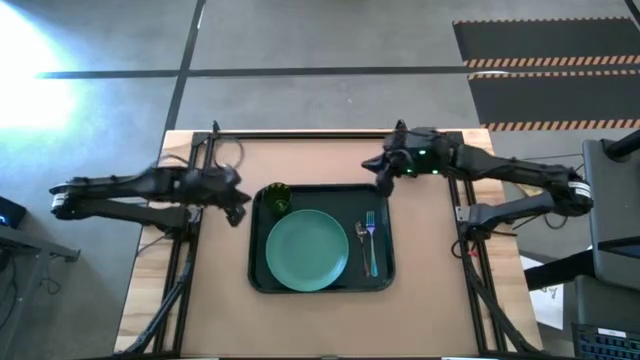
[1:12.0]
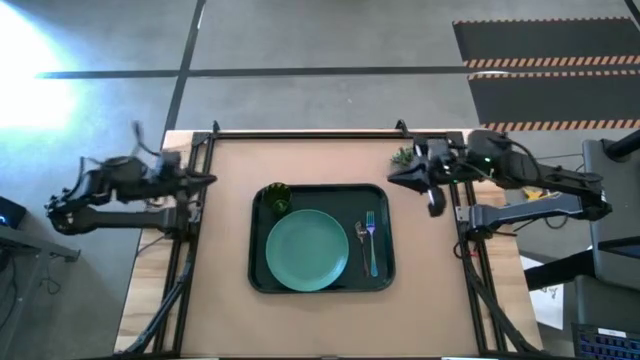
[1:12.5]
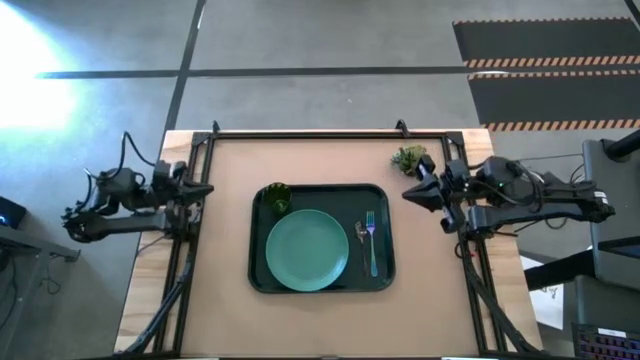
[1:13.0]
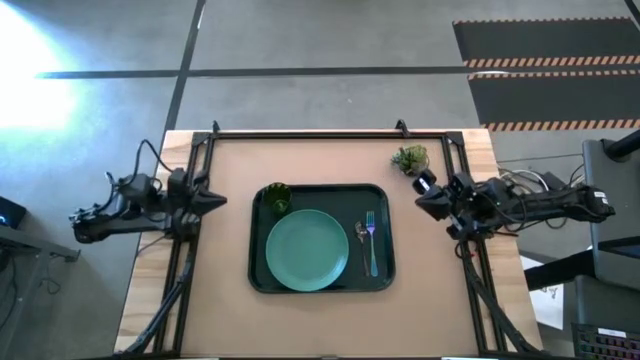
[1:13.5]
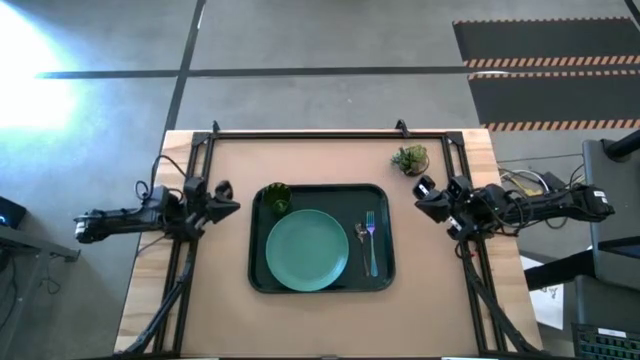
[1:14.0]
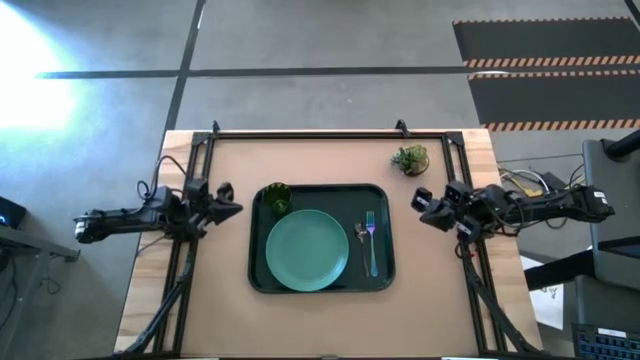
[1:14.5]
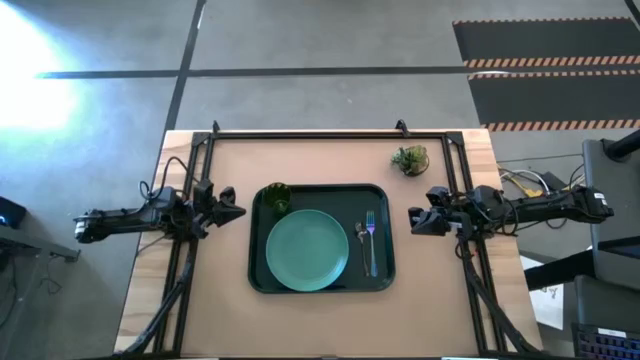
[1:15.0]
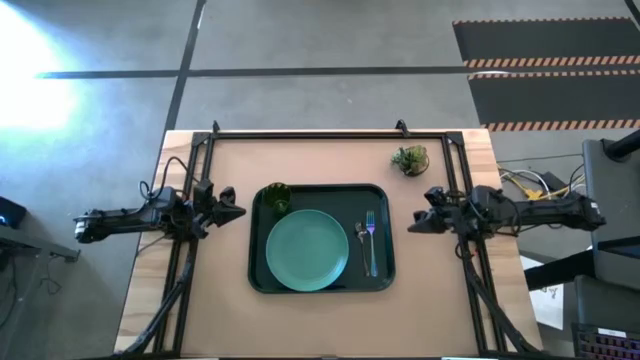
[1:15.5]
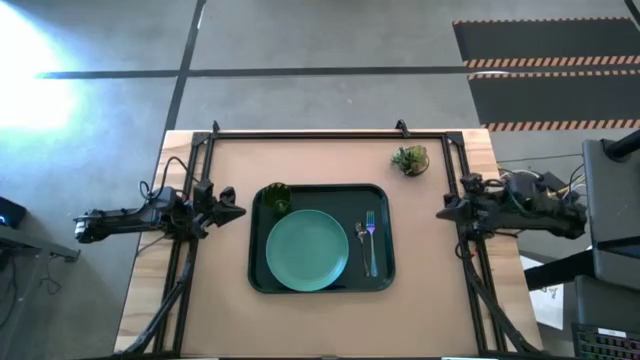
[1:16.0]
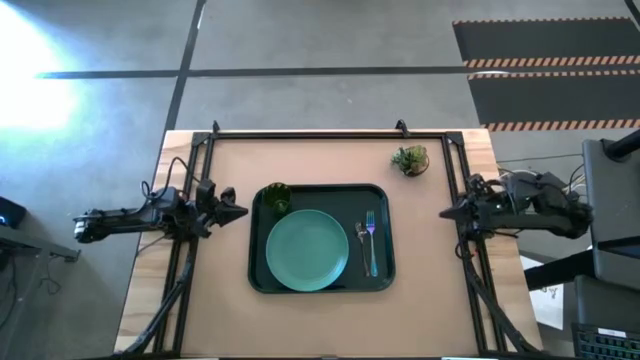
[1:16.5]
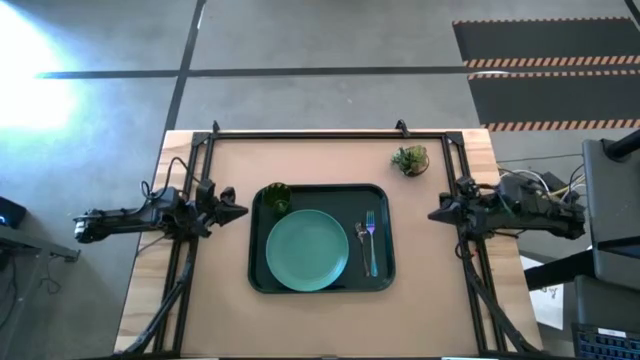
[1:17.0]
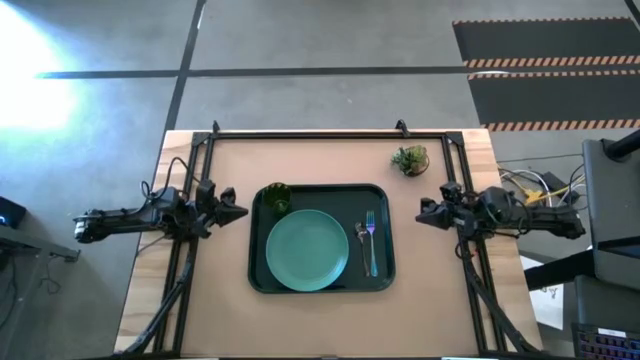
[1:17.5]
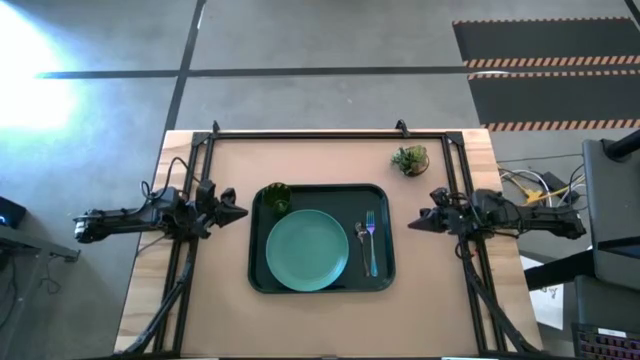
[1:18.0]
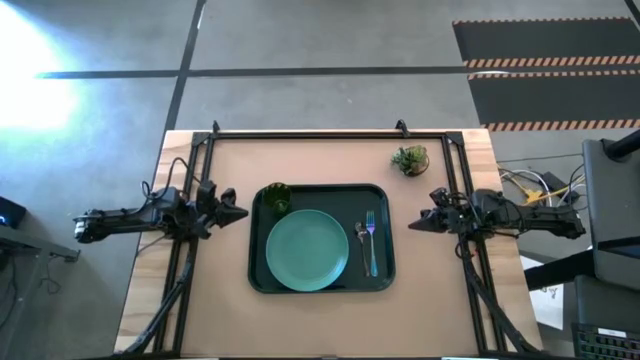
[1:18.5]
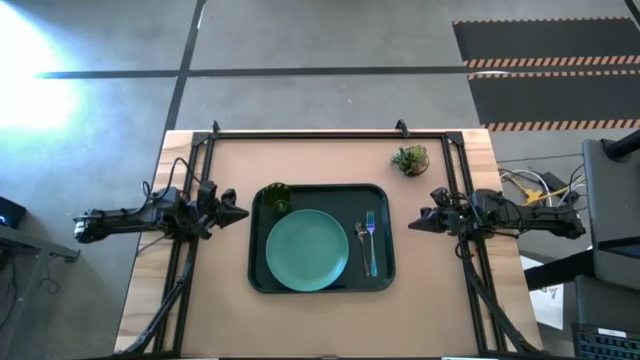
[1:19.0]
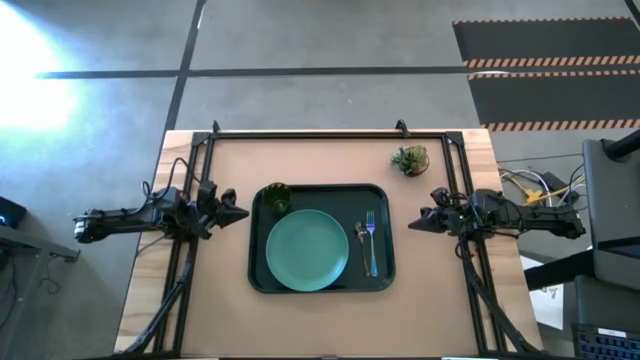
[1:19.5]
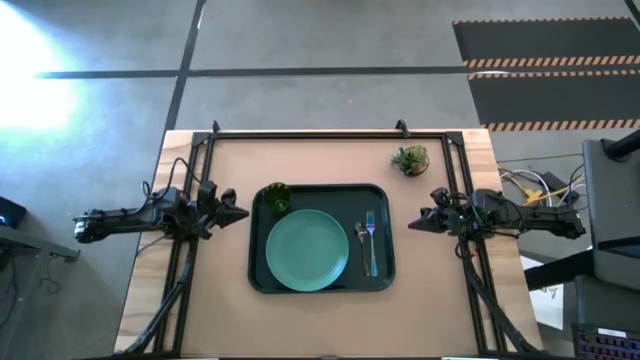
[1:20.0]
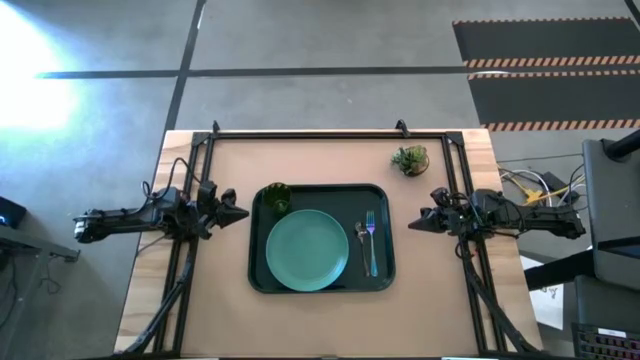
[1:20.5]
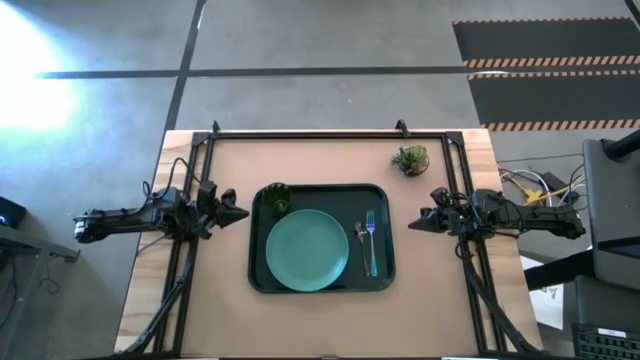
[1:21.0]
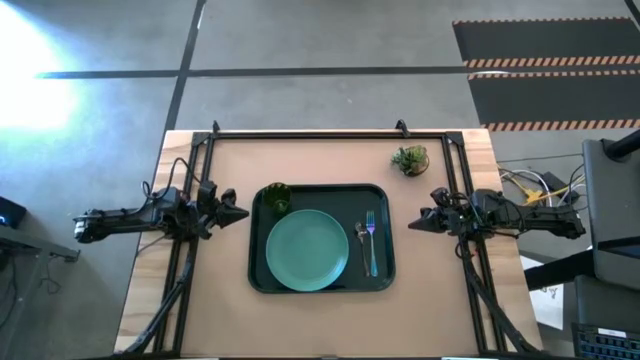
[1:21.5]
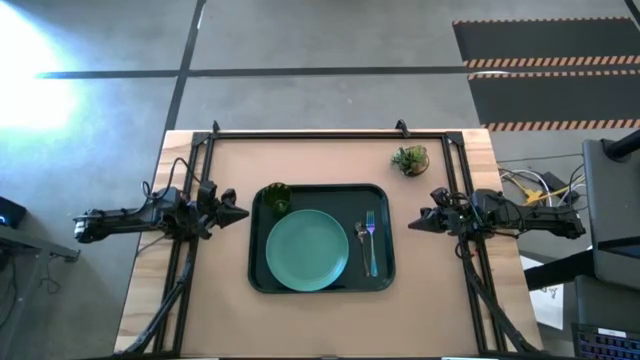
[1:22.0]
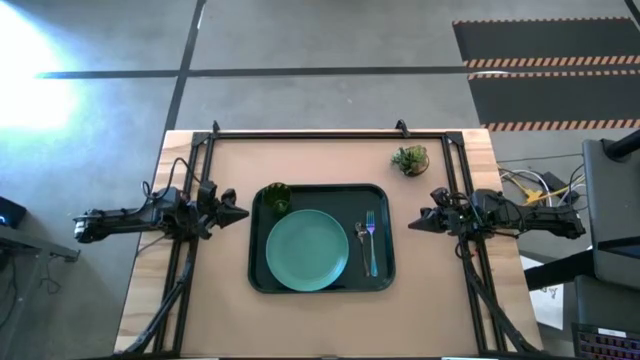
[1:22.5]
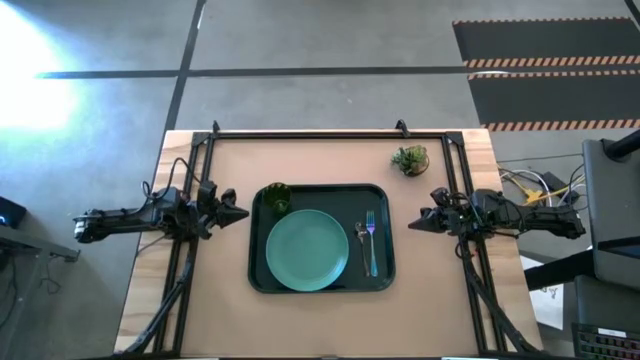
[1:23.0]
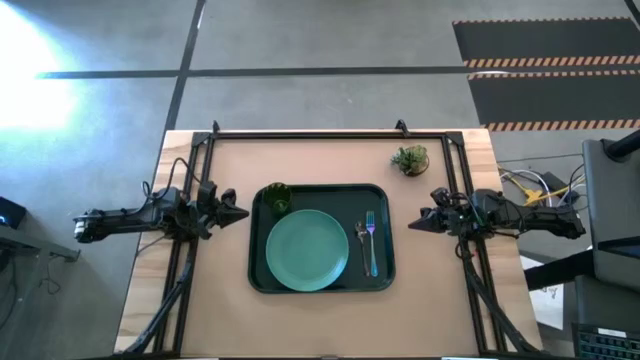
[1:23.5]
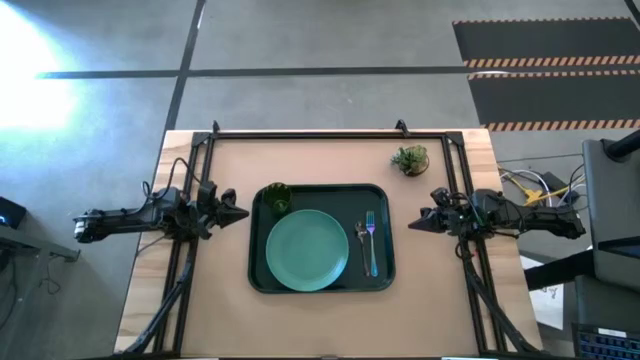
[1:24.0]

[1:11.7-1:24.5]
Task: Pick and place plate/cup/fork/spoon on tray
Return to Home Position

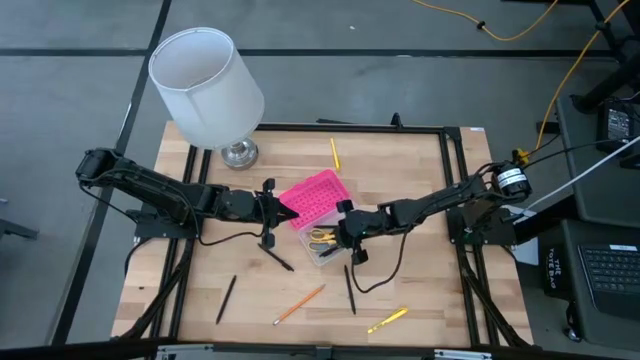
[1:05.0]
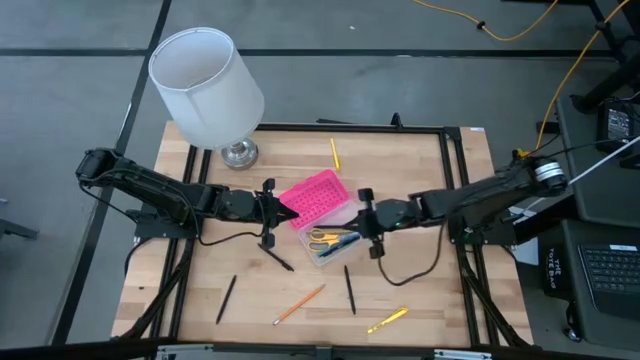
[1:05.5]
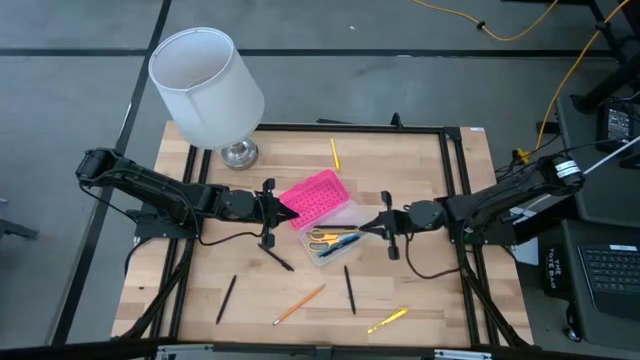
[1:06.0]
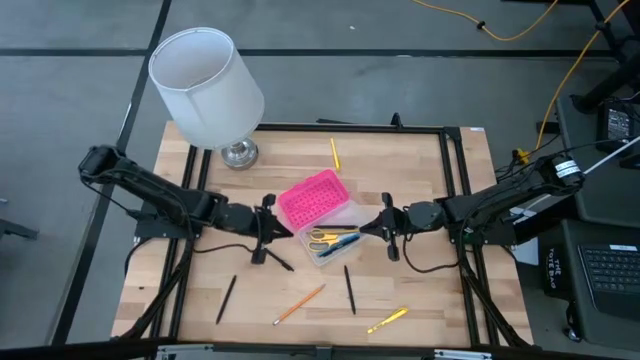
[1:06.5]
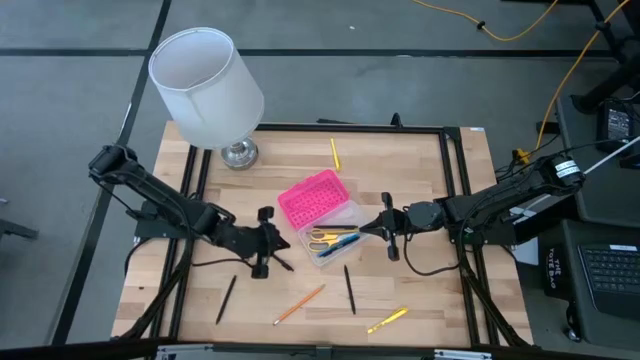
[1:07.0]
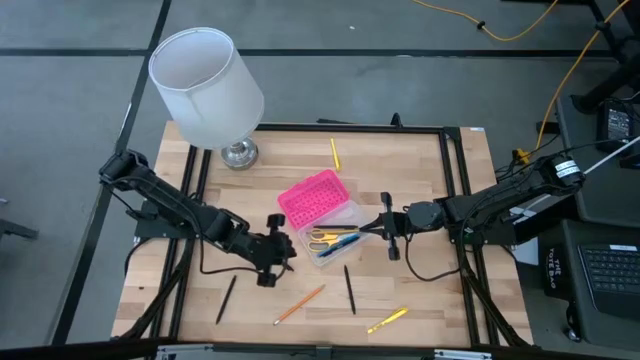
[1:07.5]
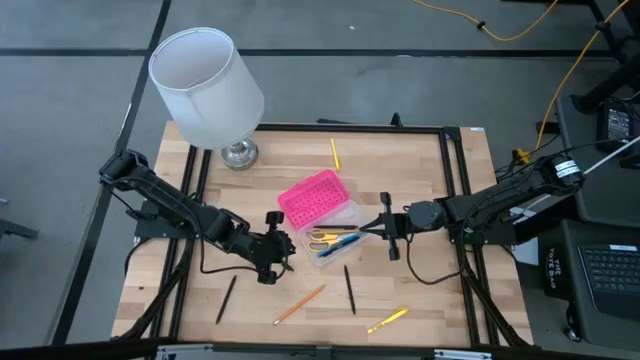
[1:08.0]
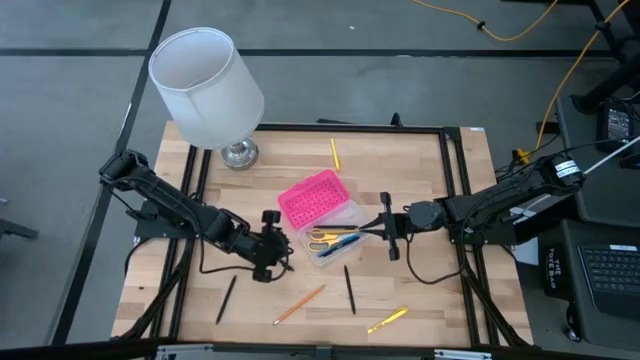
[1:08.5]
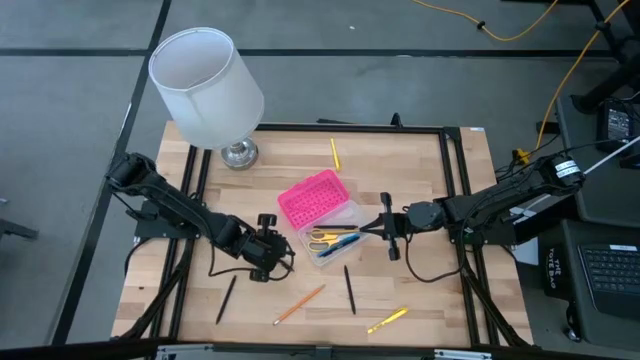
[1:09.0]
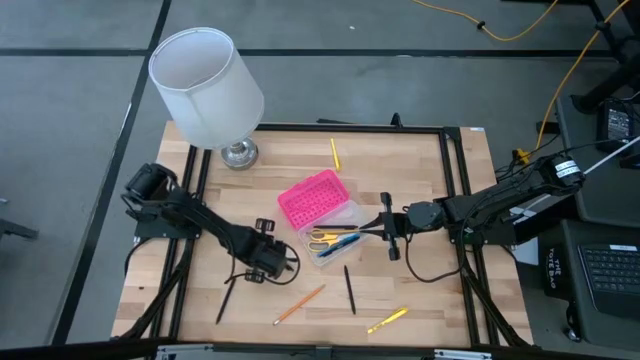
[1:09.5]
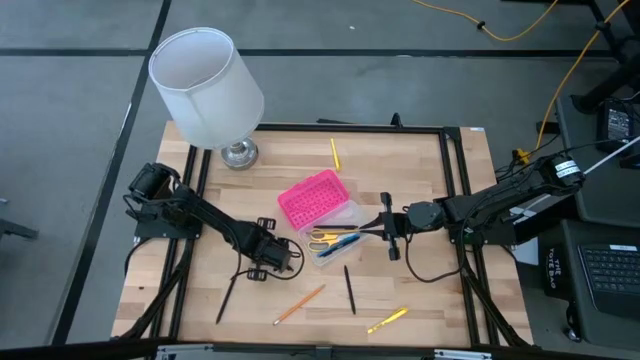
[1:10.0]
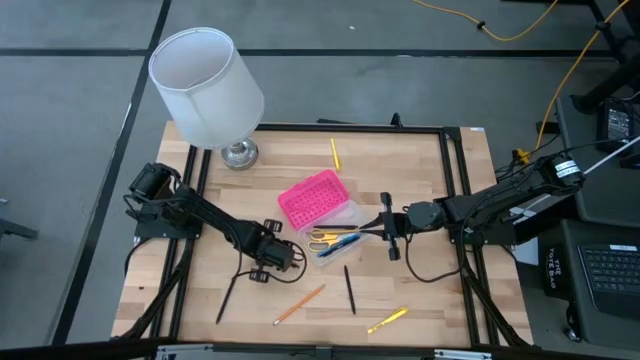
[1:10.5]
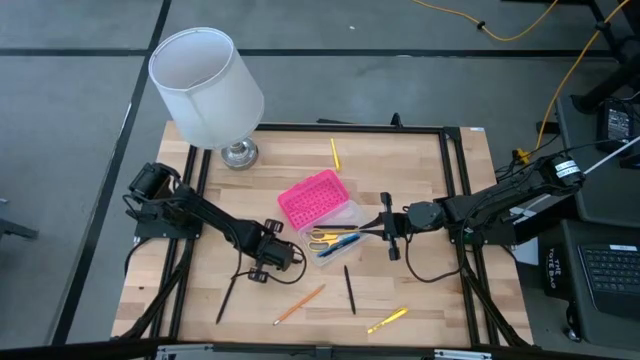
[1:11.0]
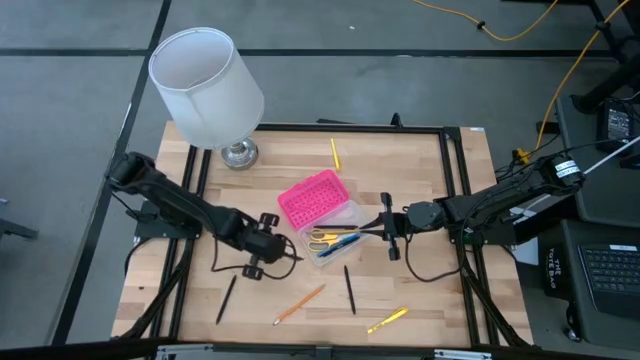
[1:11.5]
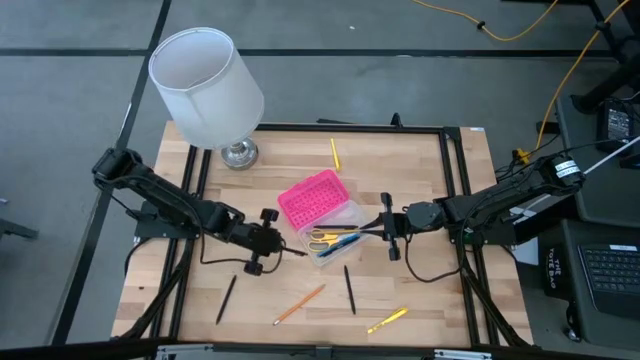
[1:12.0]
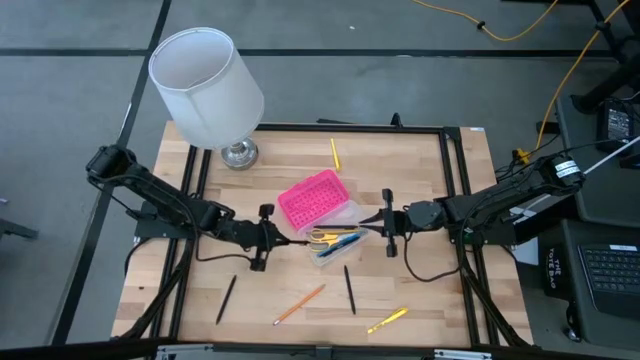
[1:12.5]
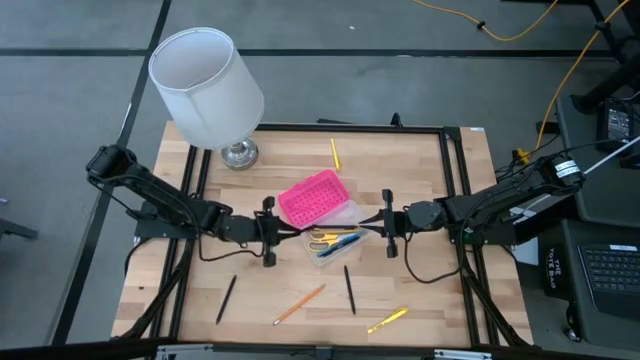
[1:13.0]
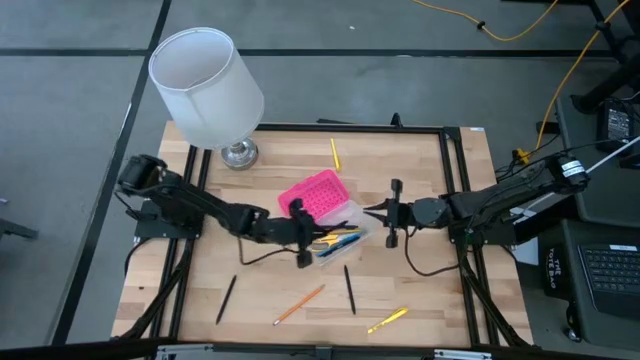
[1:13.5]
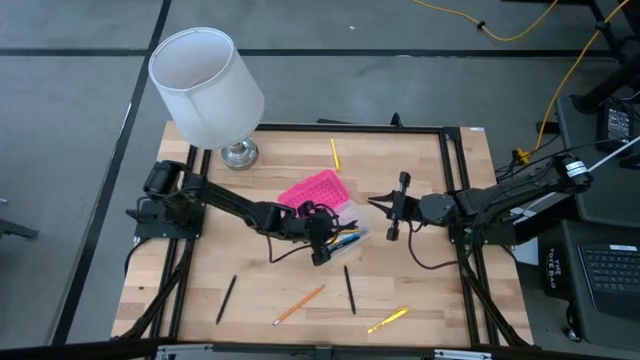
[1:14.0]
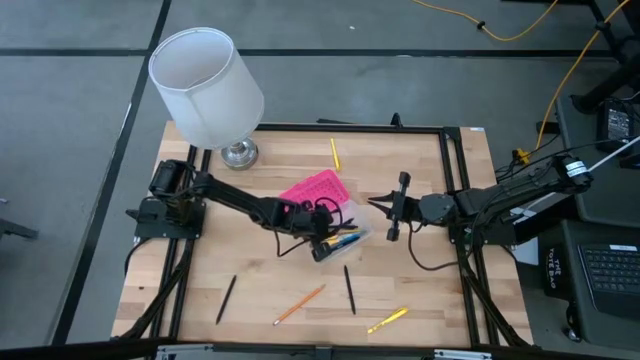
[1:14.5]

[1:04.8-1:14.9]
Task: Pick & place school supplies into a supply box
Put the black pen into the supply box
